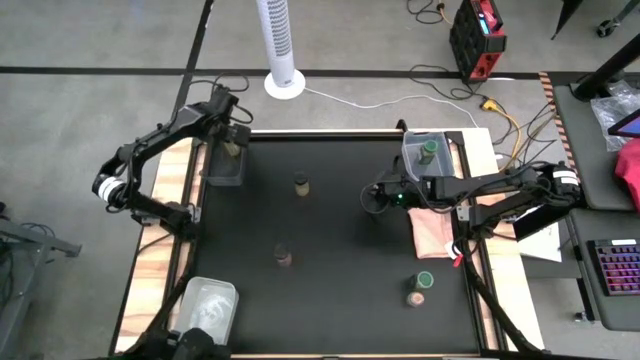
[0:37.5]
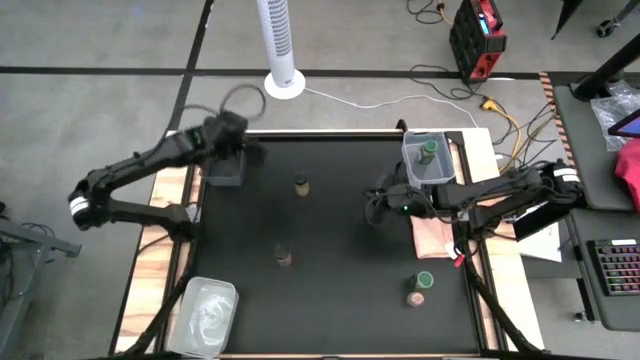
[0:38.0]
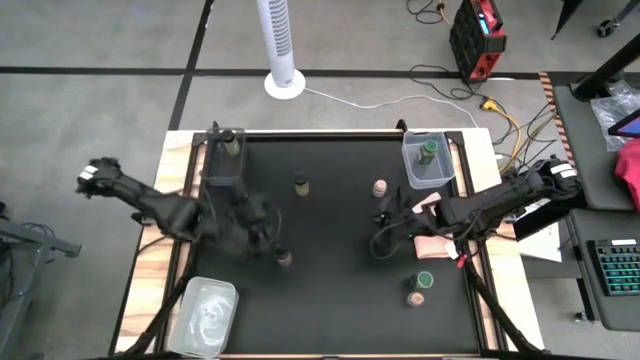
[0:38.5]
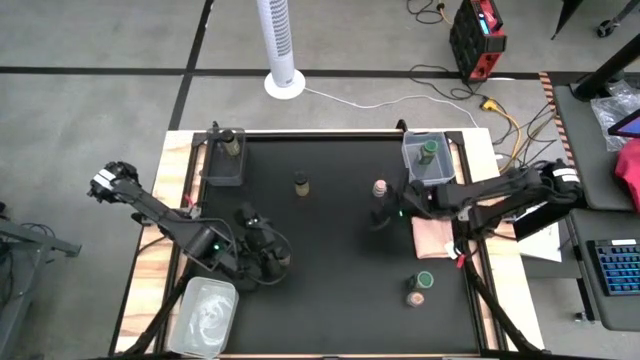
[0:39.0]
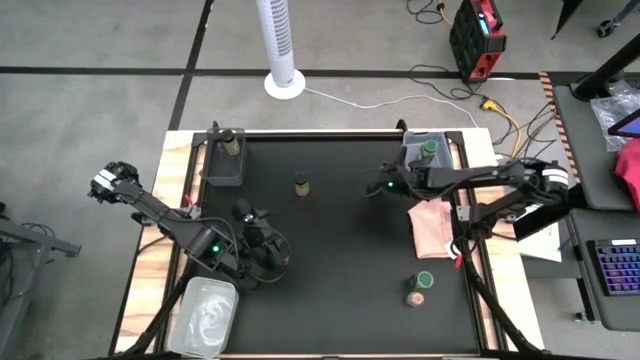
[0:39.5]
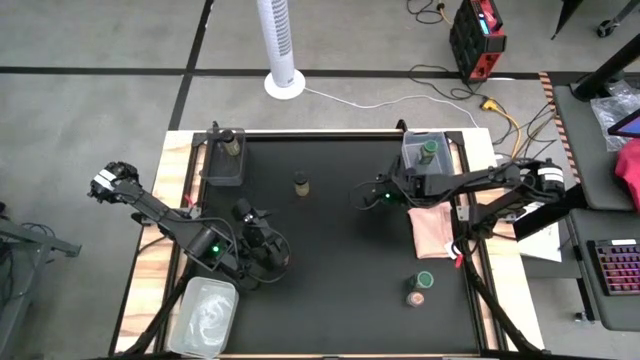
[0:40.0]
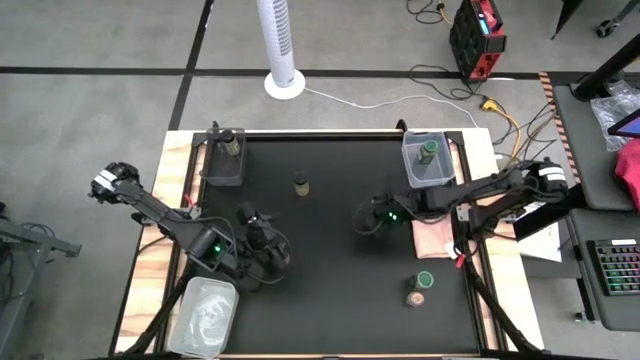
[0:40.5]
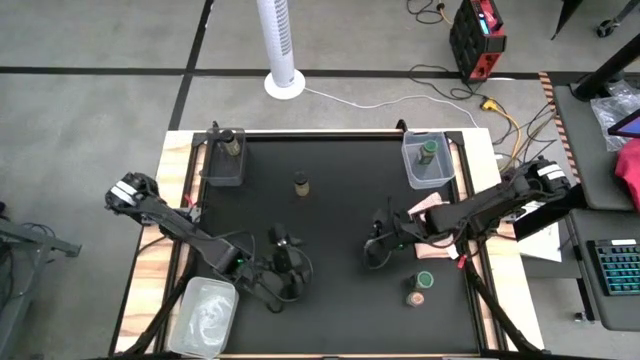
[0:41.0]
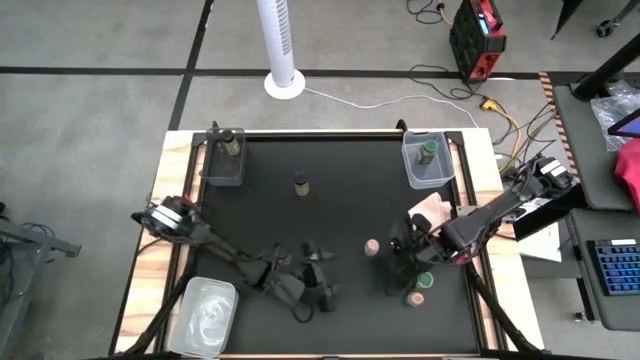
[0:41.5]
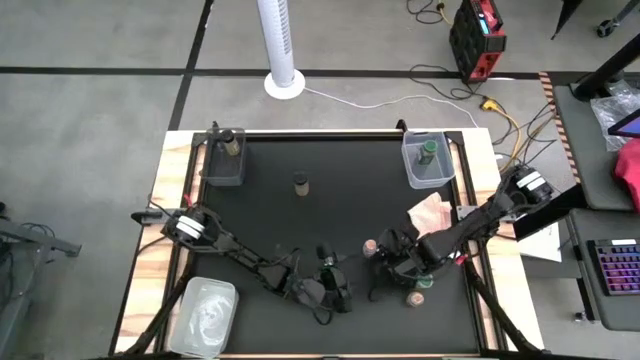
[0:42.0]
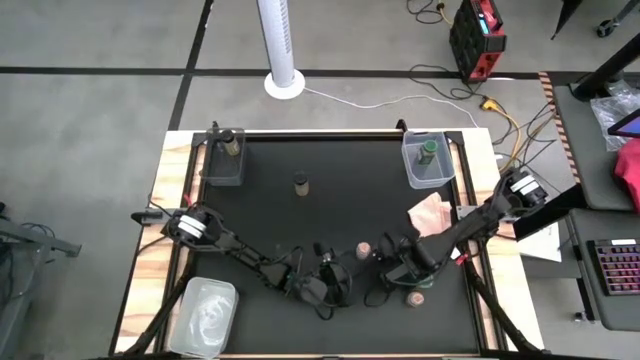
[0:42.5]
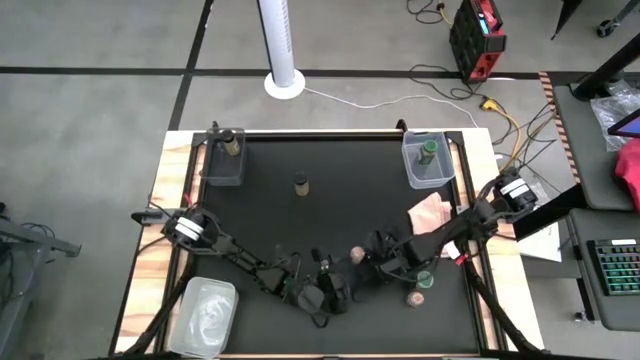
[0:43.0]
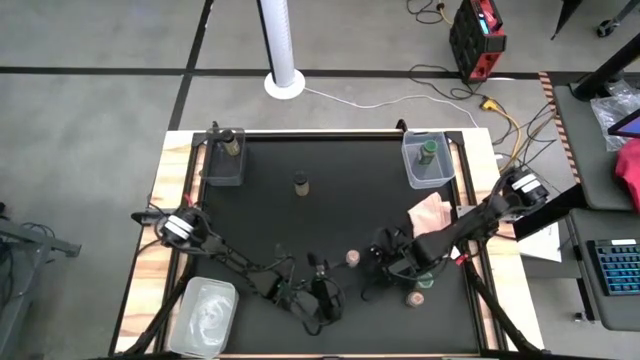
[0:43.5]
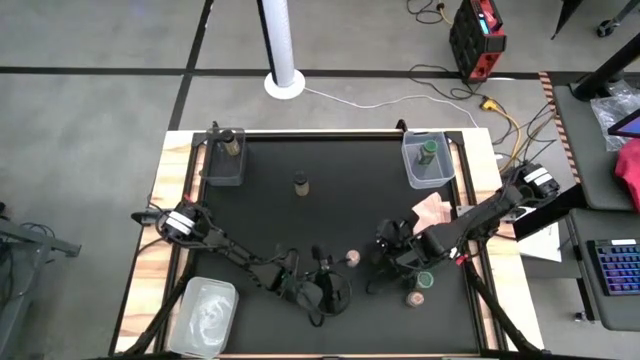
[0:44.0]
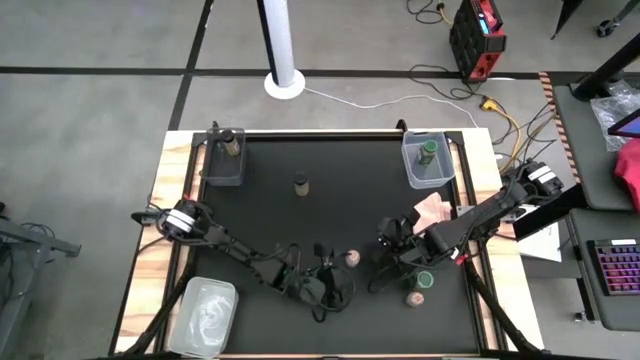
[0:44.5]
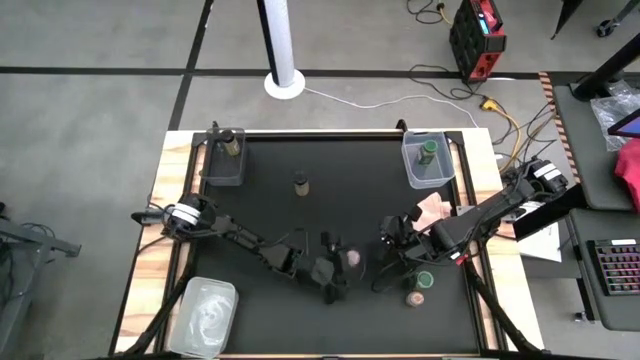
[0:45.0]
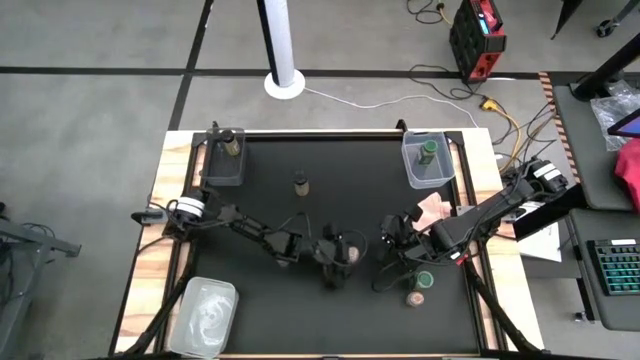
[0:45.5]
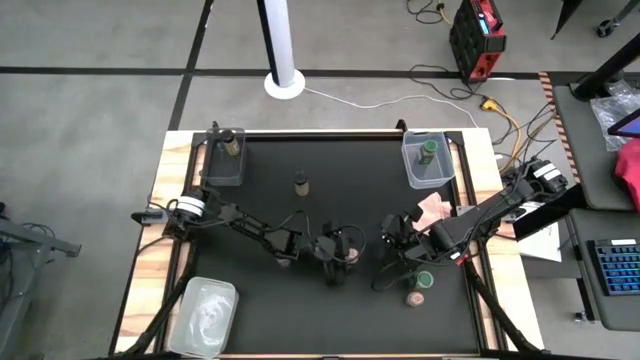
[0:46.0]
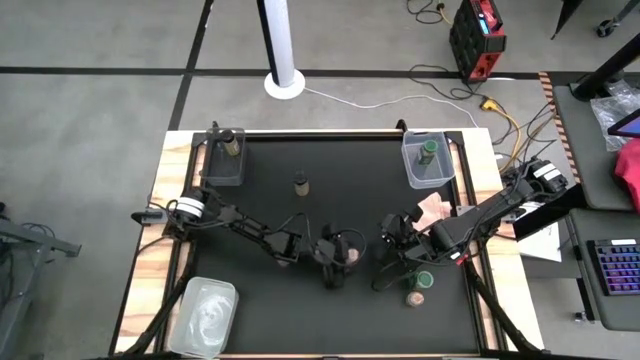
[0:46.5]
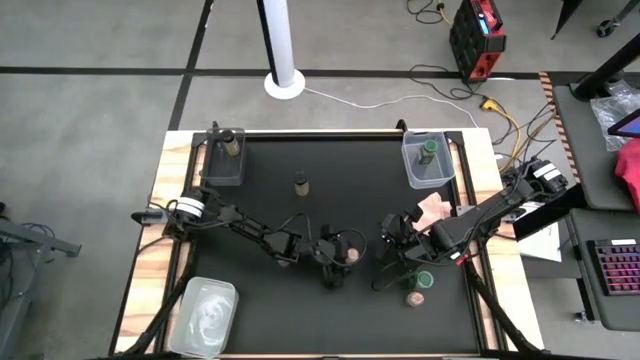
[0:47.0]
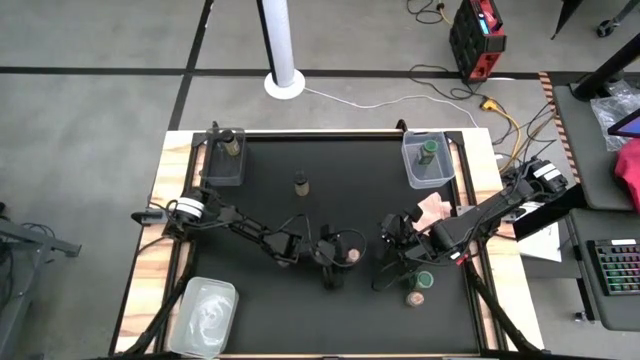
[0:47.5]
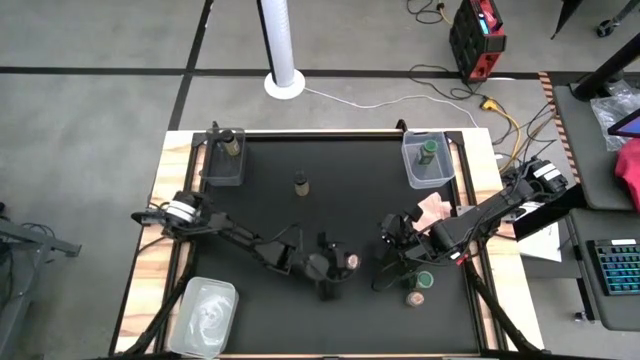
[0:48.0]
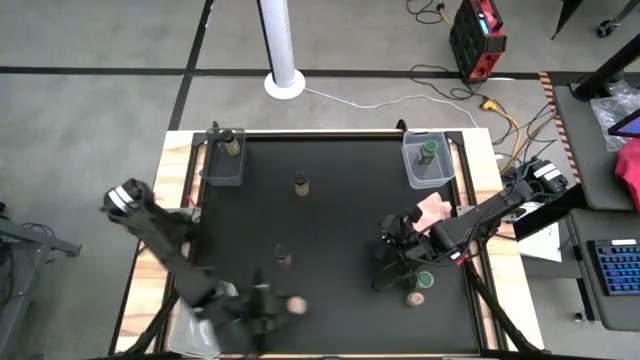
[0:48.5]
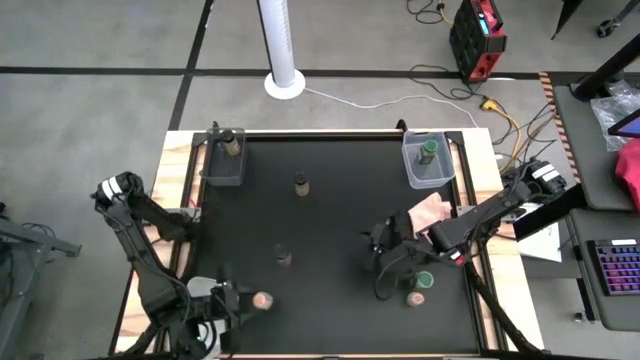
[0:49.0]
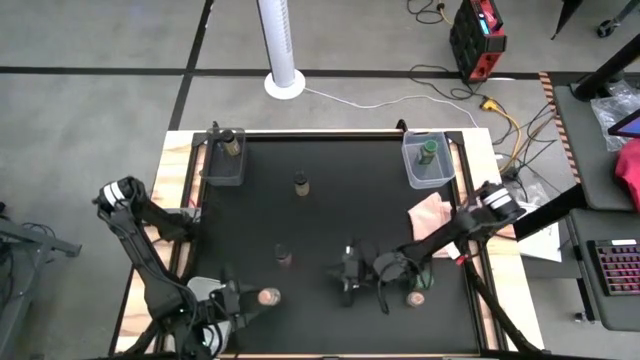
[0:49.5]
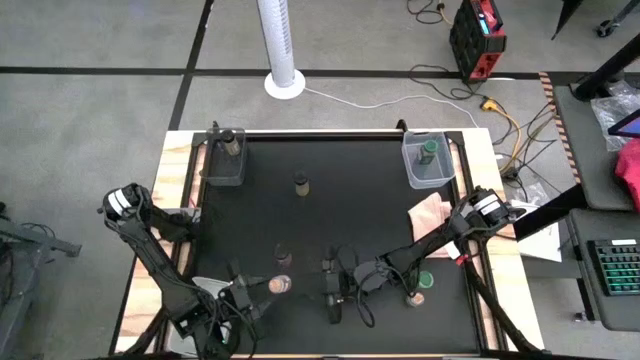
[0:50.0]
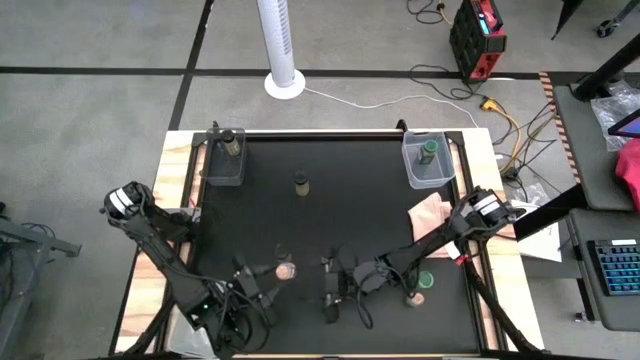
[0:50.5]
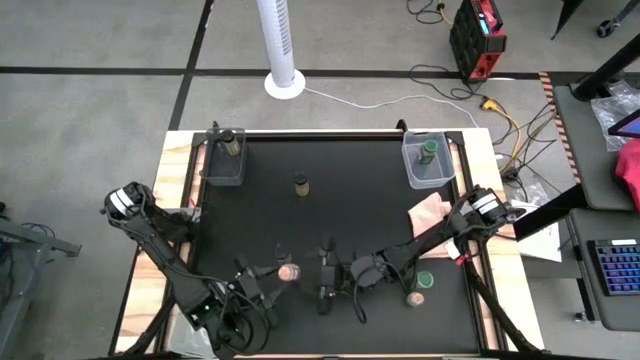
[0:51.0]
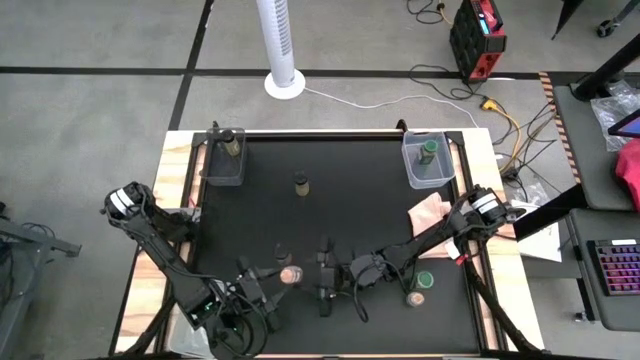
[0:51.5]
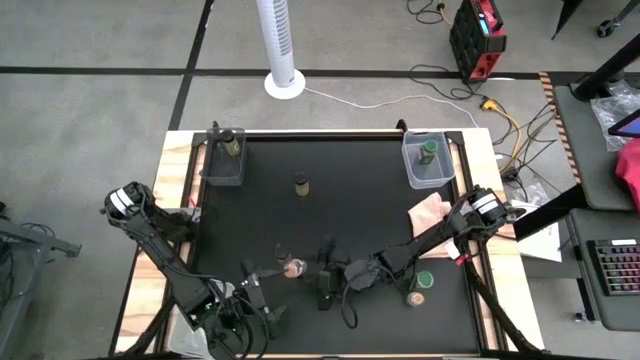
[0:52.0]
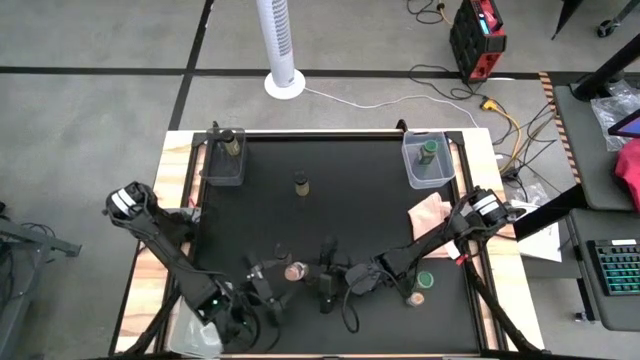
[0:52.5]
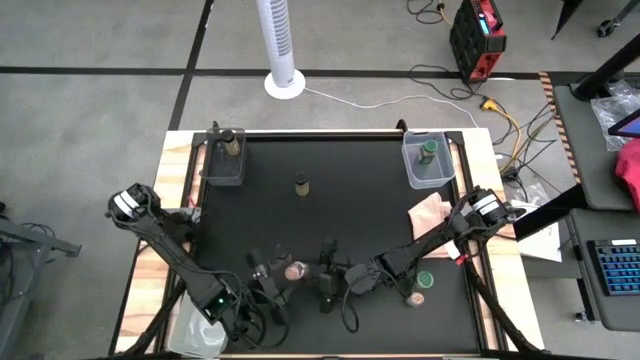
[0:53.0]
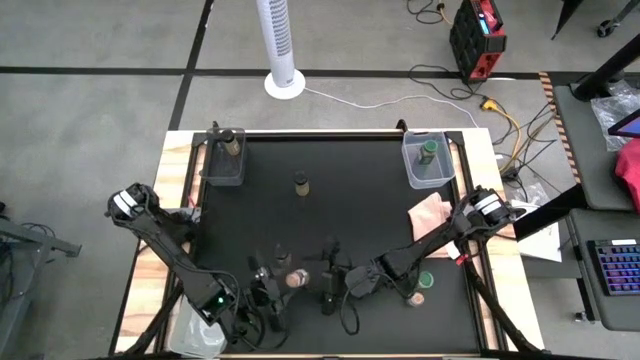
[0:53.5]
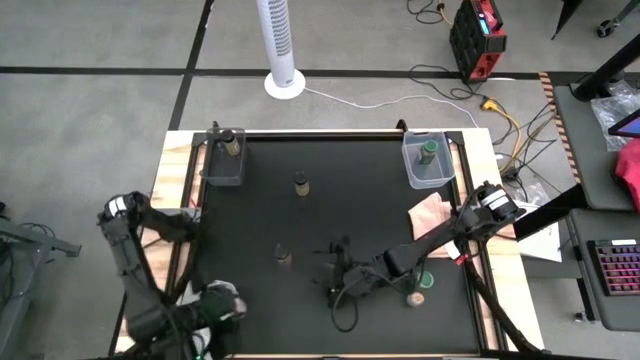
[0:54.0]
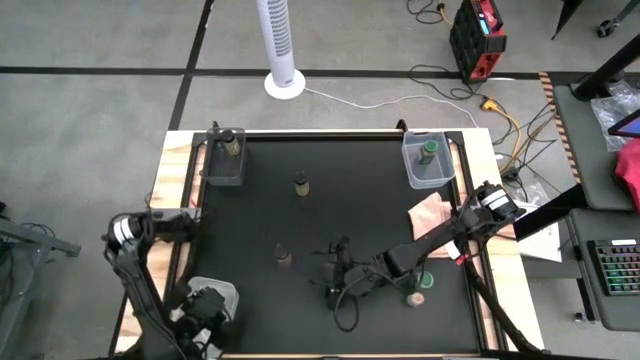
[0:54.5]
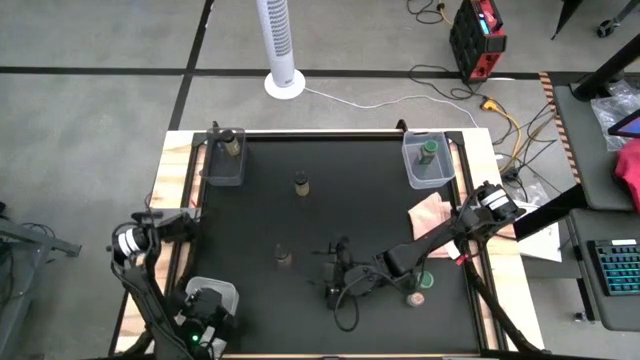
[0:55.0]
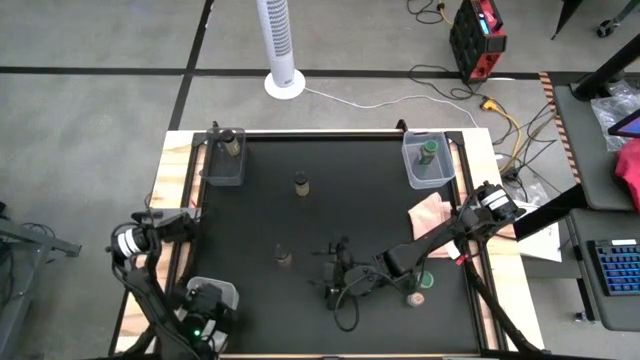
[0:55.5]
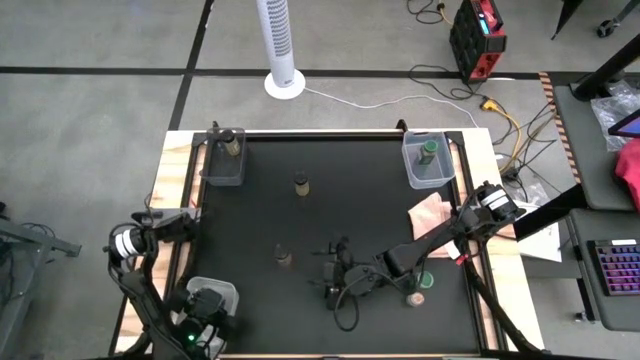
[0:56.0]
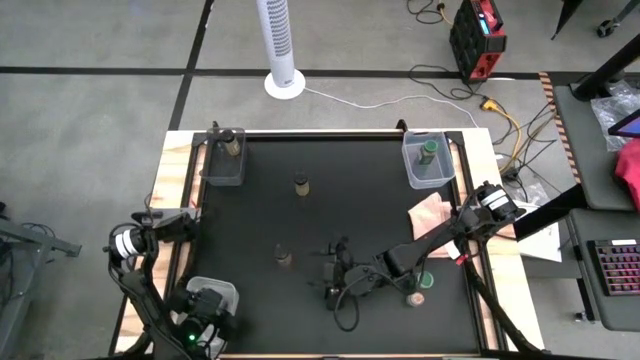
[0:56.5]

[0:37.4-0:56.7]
Task: Sort spices by type
Put the top brown spice bottle into the white bin

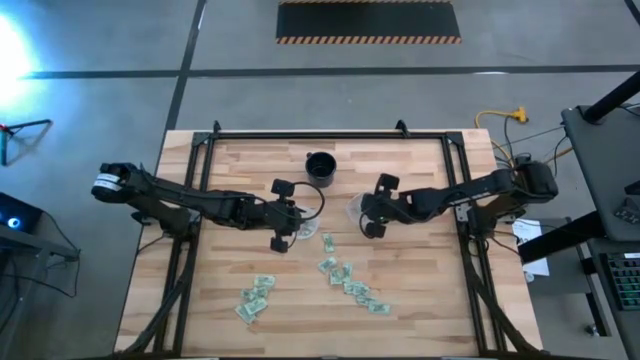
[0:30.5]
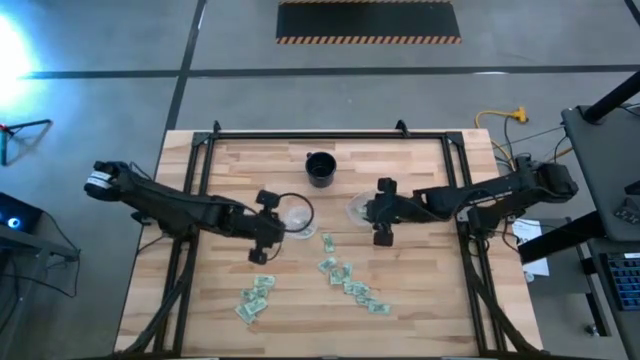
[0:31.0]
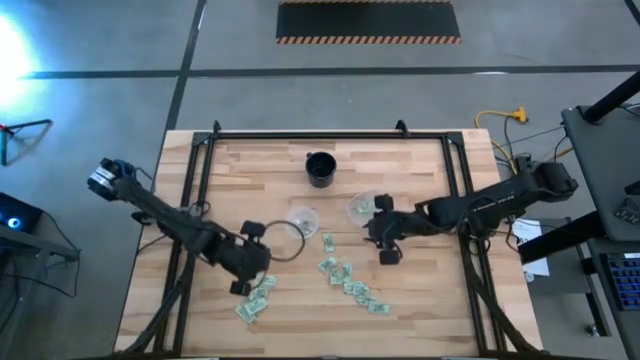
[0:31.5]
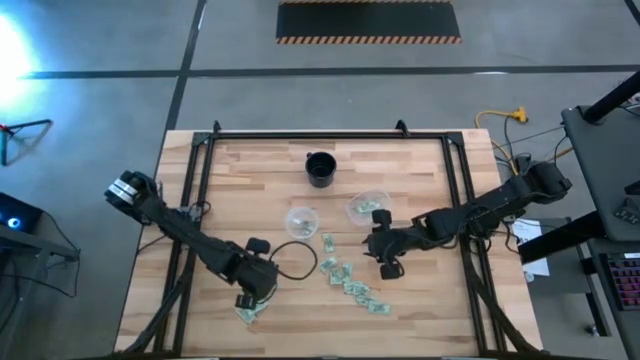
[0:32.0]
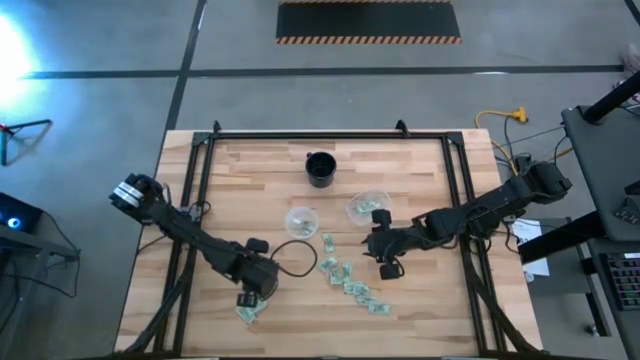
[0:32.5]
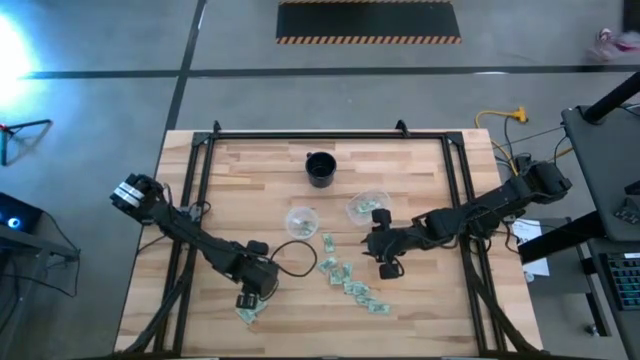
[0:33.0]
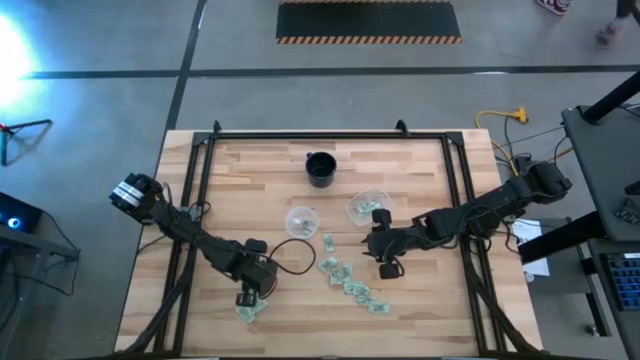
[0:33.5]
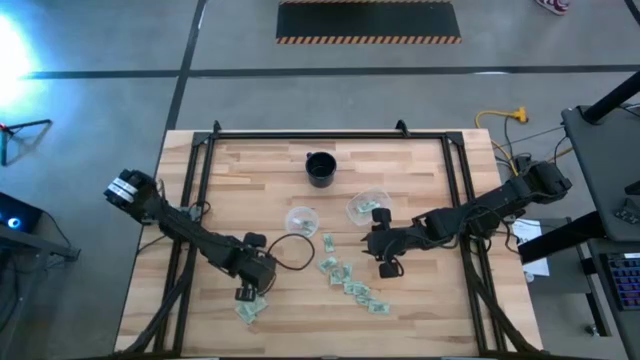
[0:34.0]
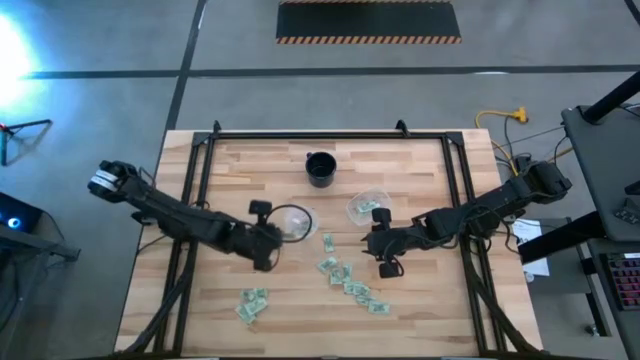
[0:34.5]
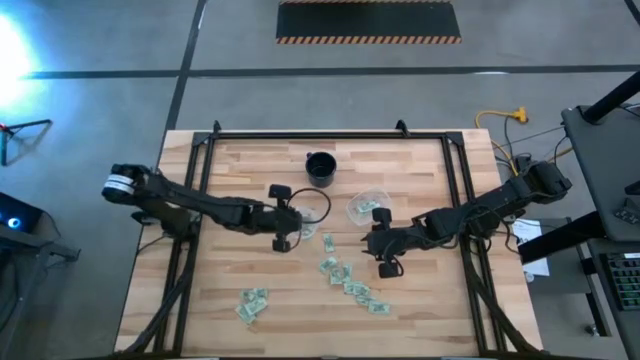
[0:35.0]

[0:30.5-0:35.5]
Task: Pick and place Stevia / Truvia into bins
Put the green stevia packet into the left transparent container
